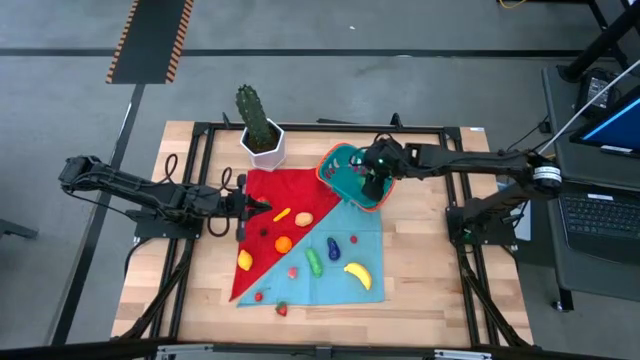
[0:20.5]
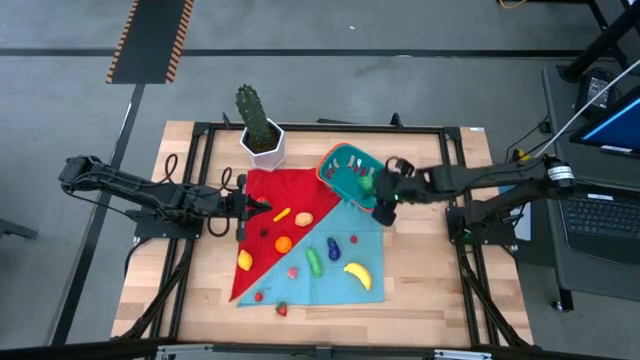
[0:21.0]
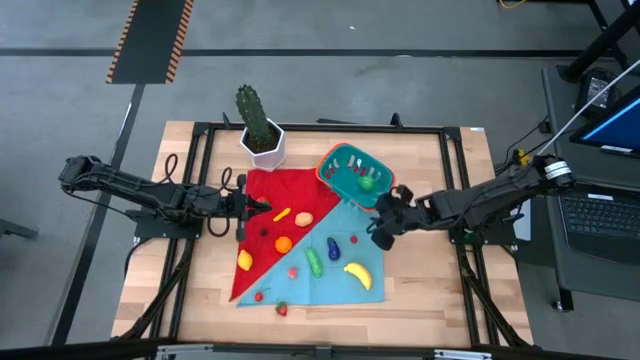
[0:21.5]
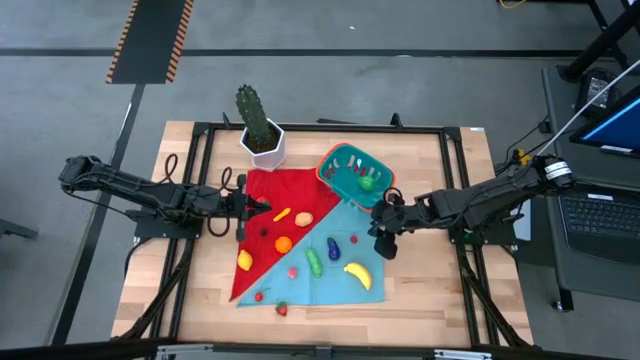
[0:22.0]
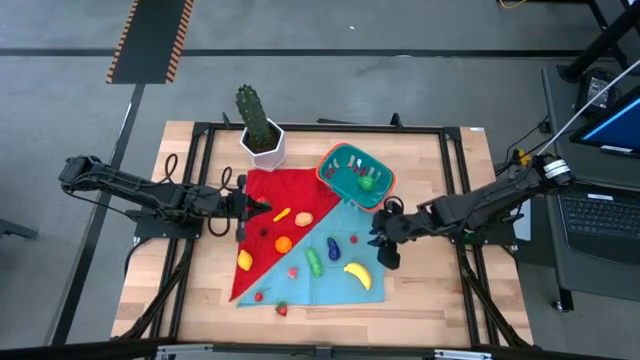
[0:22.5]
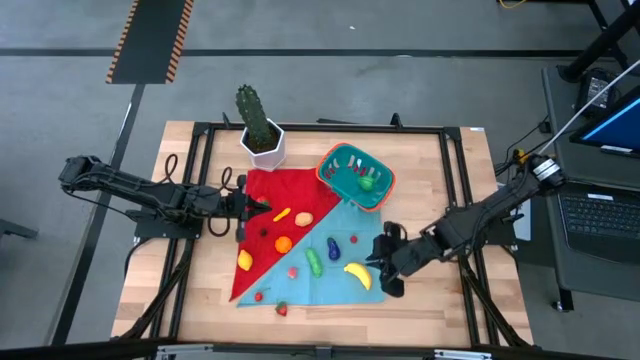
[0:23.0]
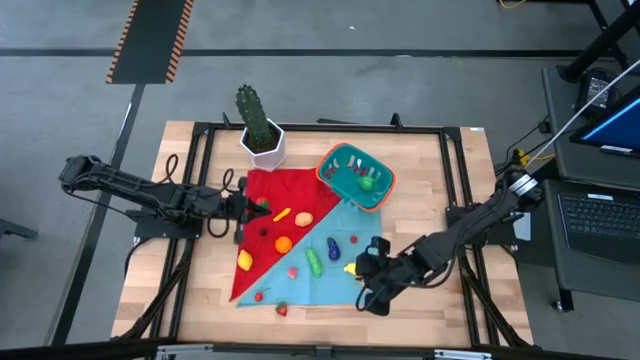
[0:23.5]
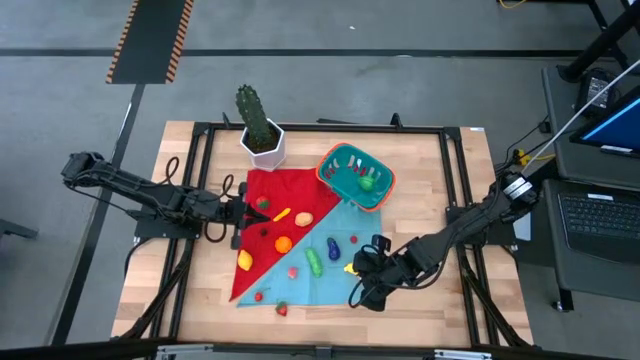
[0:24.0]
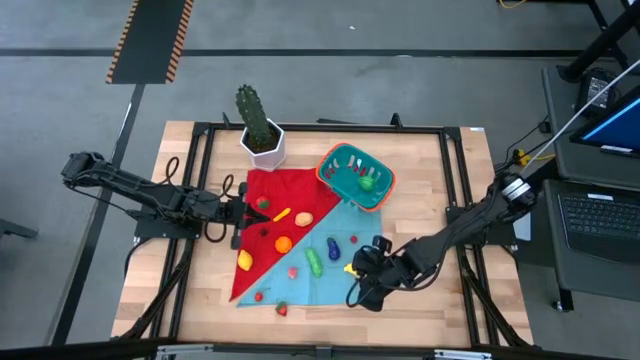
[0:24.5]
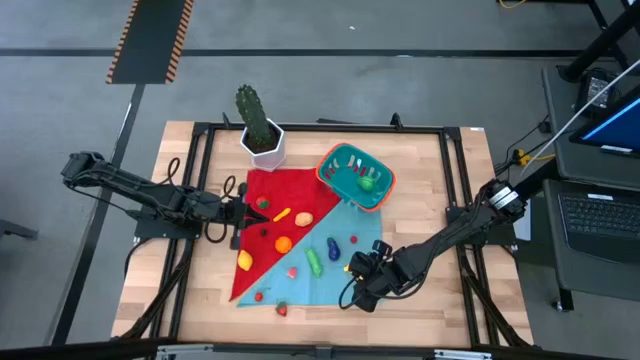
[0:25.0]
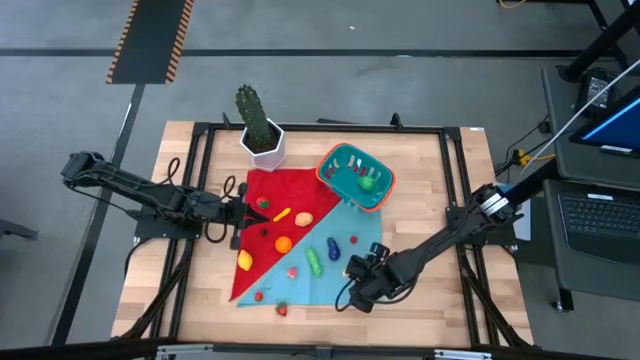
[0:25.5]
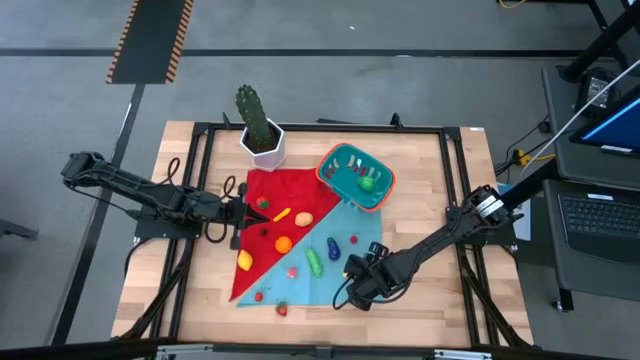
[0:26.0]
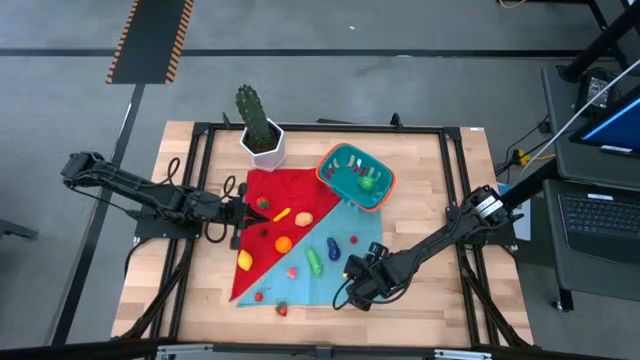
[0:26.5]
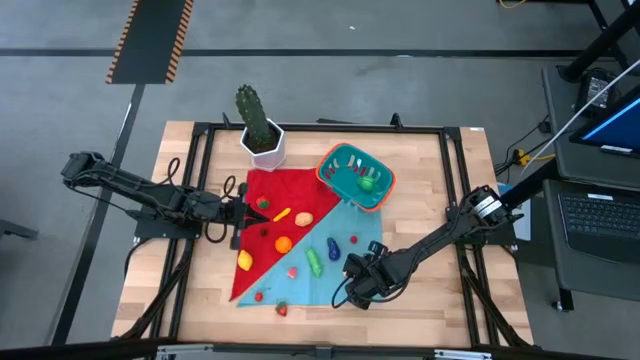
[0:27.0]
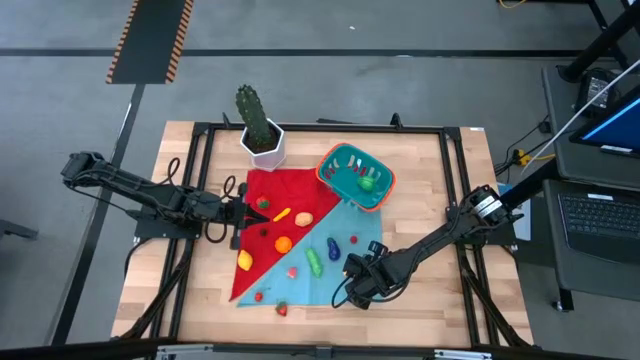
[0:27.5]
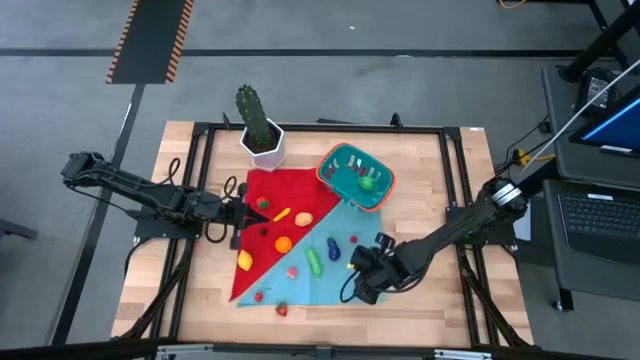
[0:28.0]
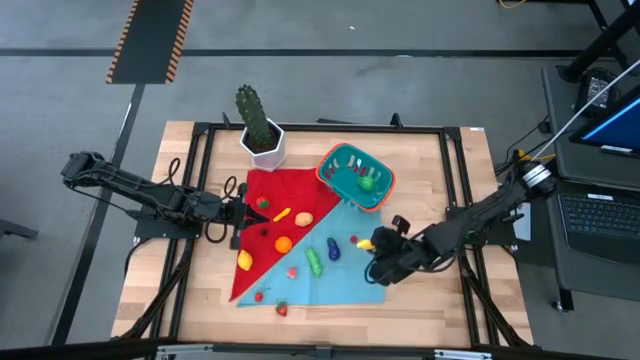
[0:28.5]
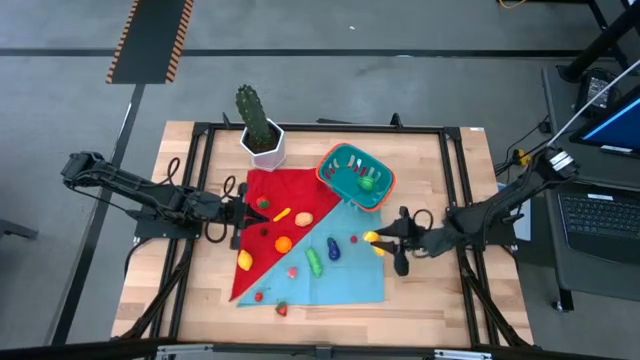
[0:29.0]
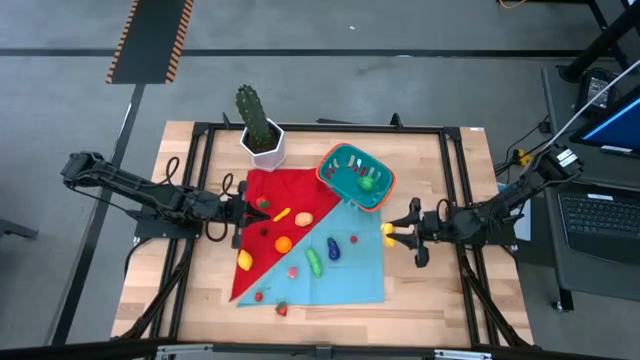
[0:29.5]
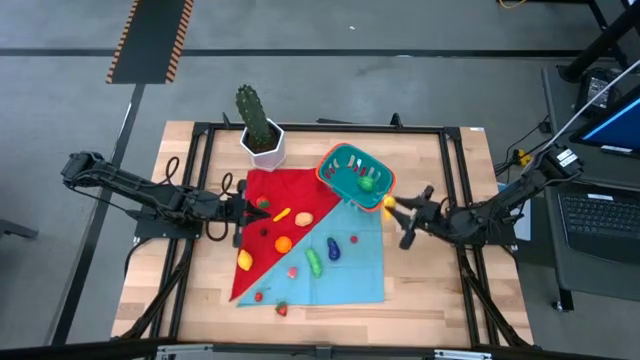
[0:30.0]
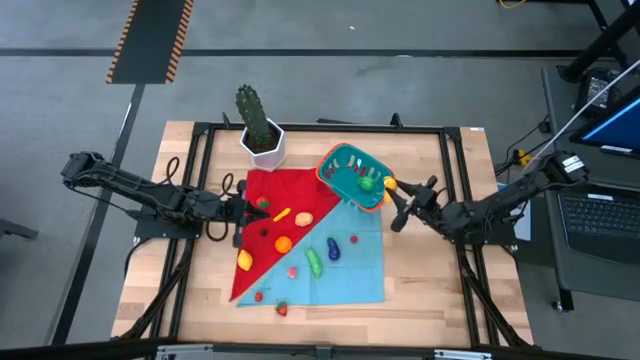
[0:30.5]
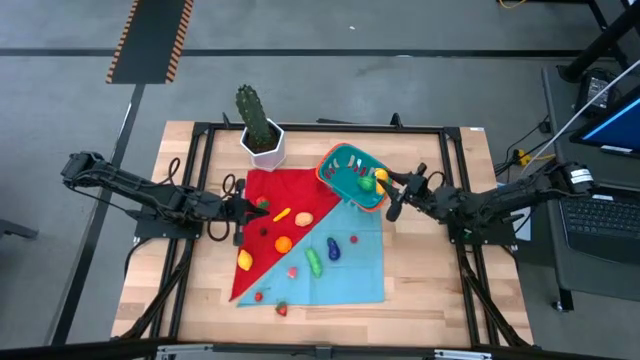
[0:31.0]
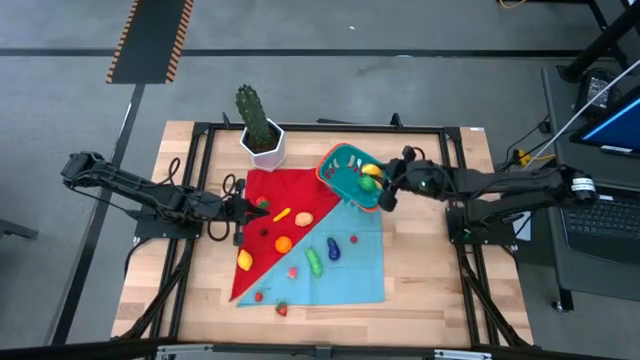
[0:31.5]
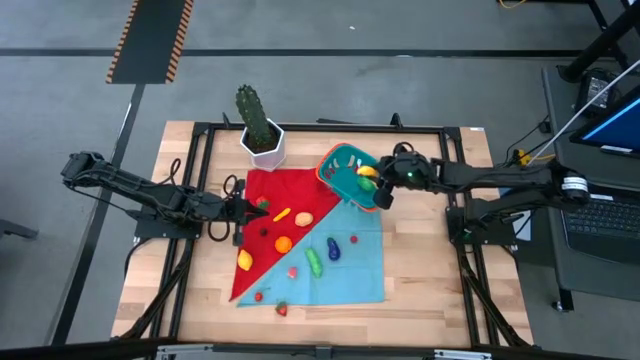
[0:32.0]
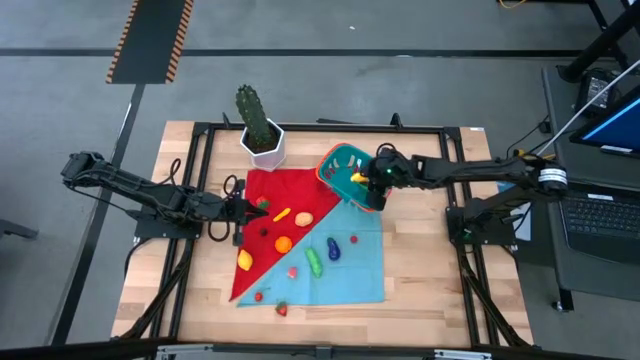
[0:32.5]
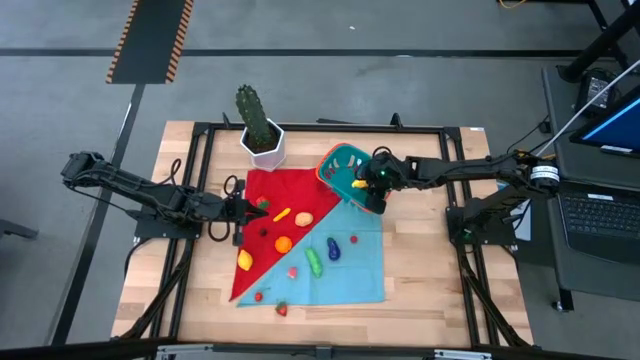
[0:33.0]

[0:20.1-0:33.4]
Task: Build produce basket
Put the yellow banana into the blue basket

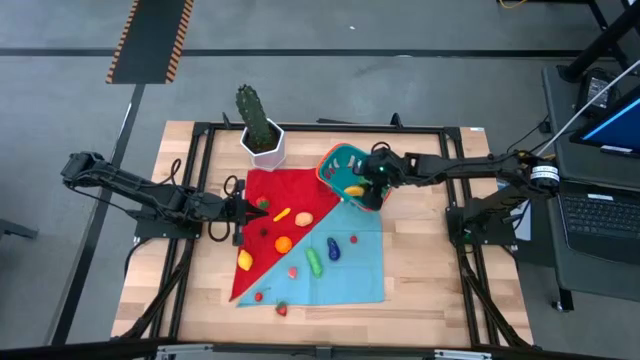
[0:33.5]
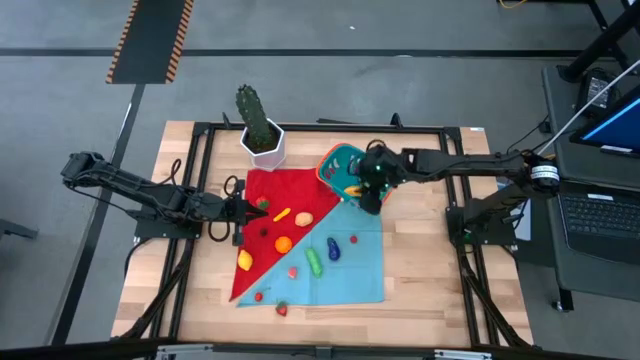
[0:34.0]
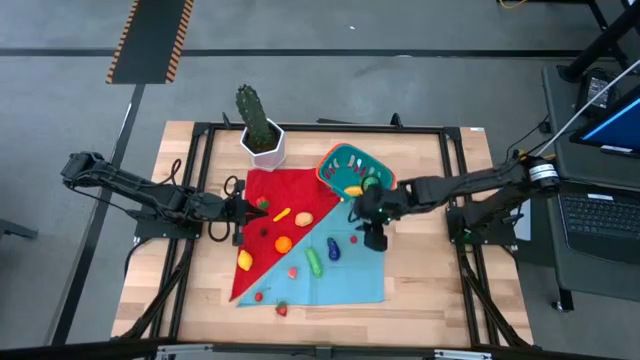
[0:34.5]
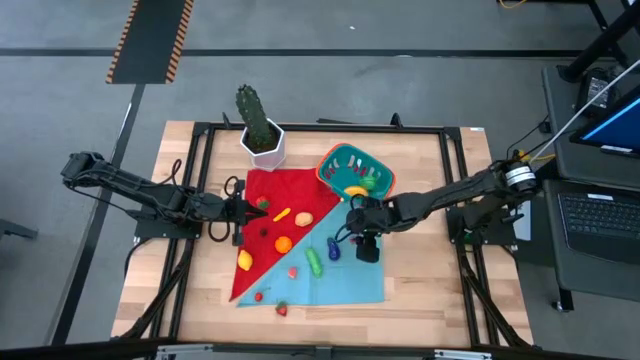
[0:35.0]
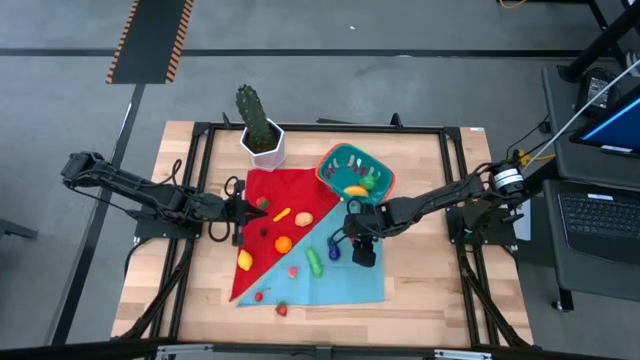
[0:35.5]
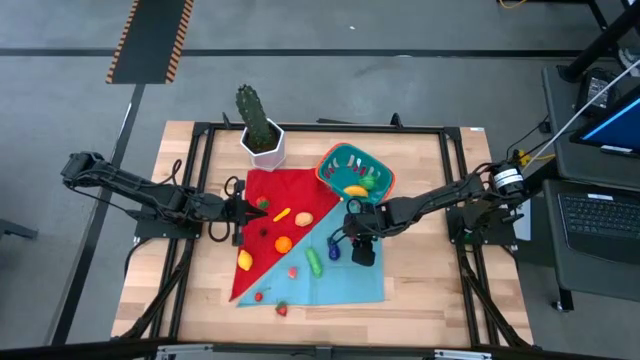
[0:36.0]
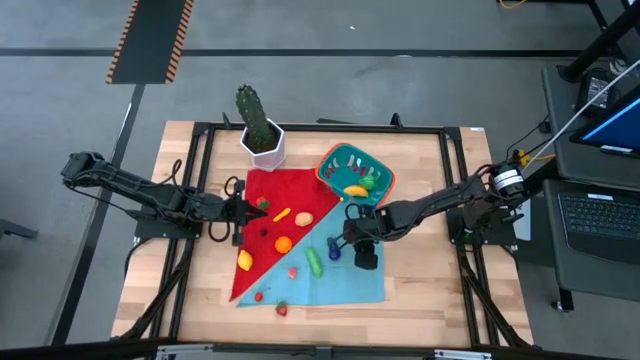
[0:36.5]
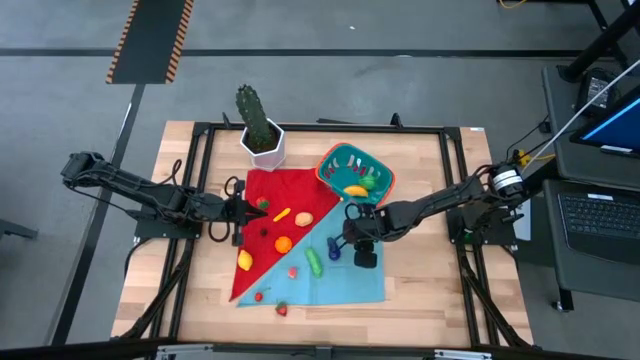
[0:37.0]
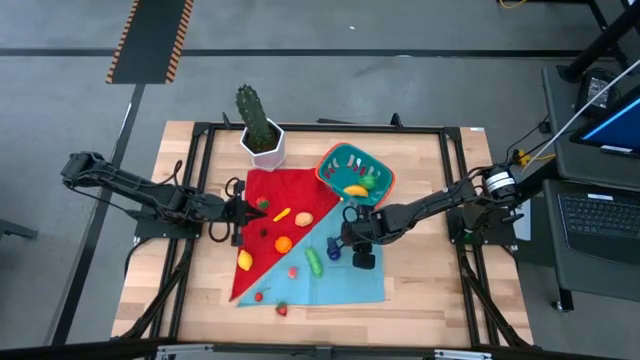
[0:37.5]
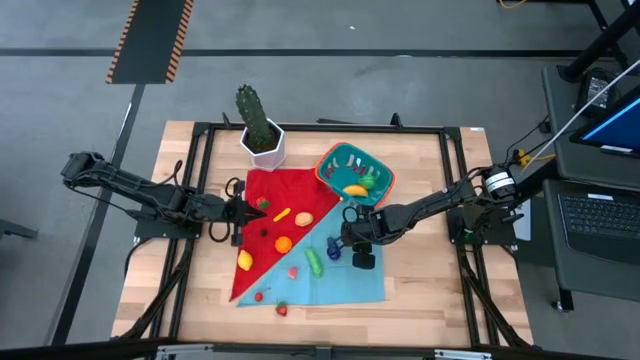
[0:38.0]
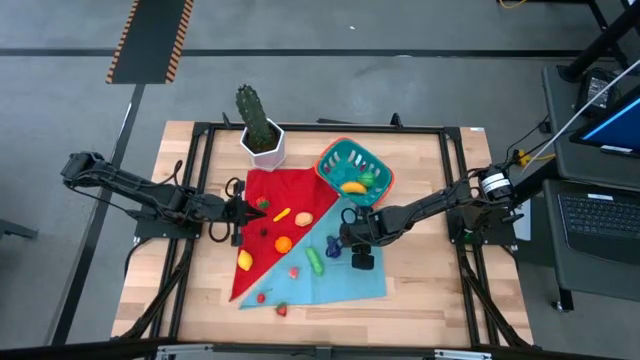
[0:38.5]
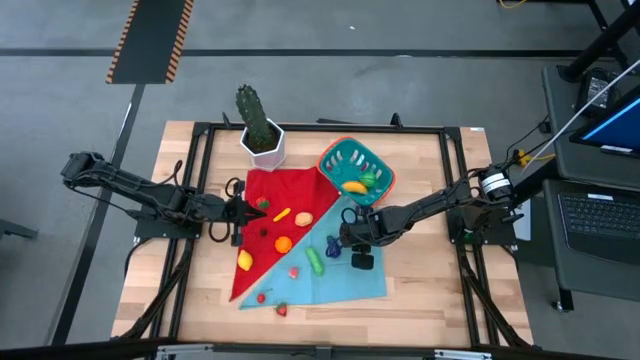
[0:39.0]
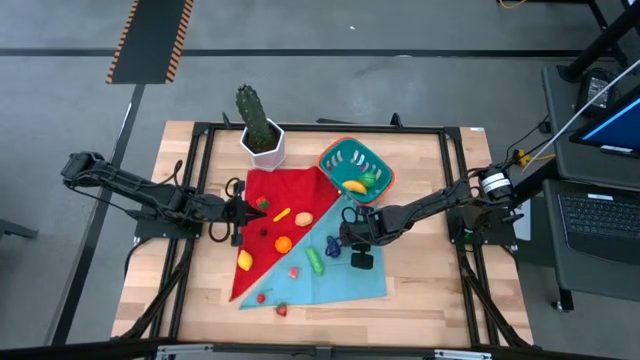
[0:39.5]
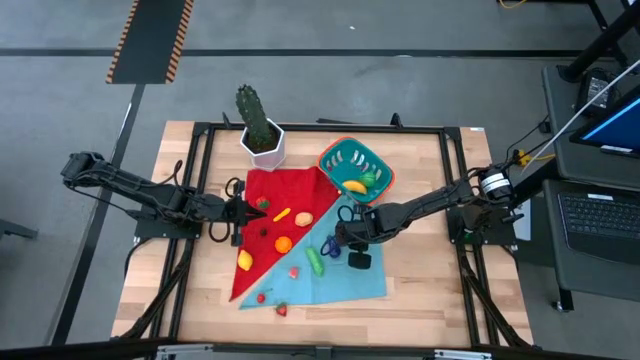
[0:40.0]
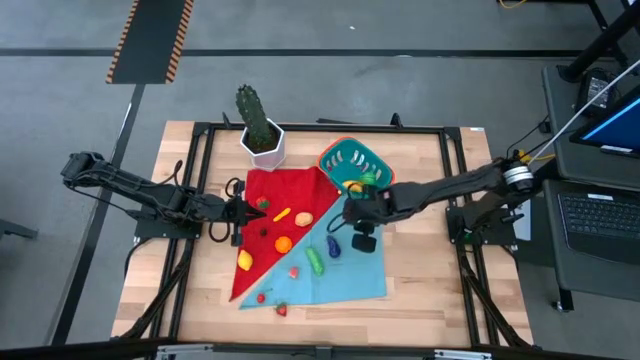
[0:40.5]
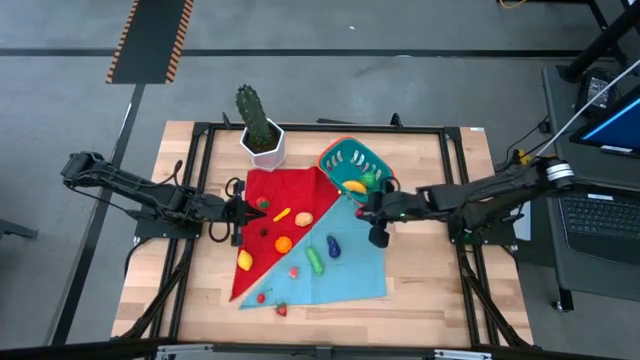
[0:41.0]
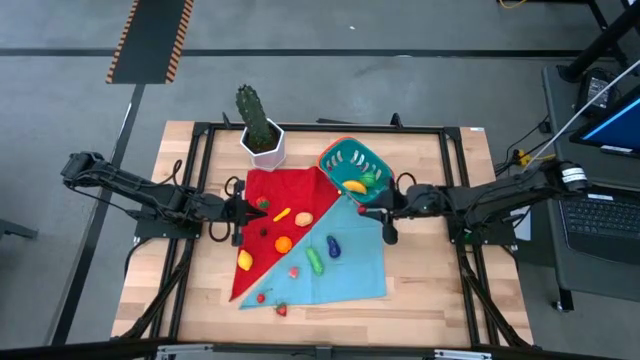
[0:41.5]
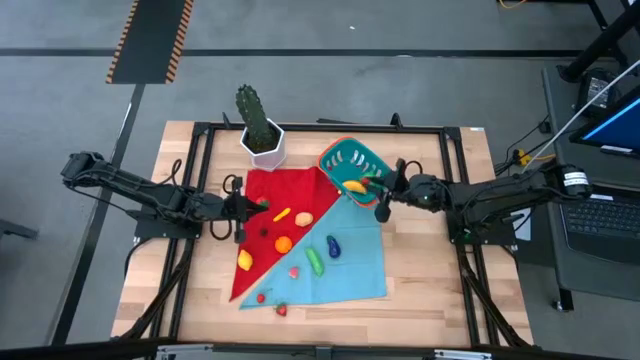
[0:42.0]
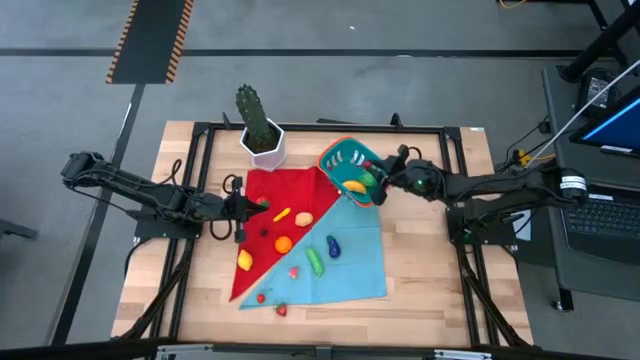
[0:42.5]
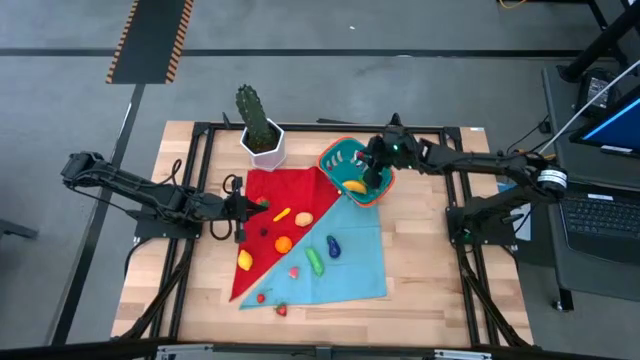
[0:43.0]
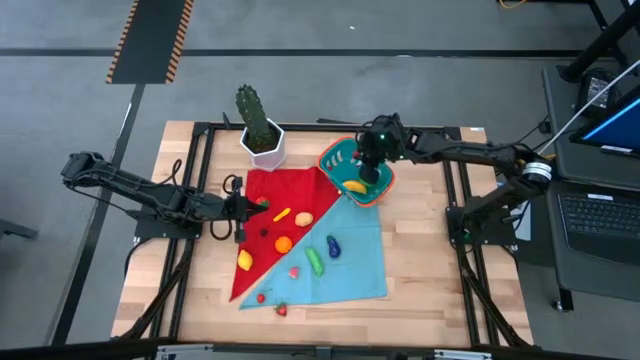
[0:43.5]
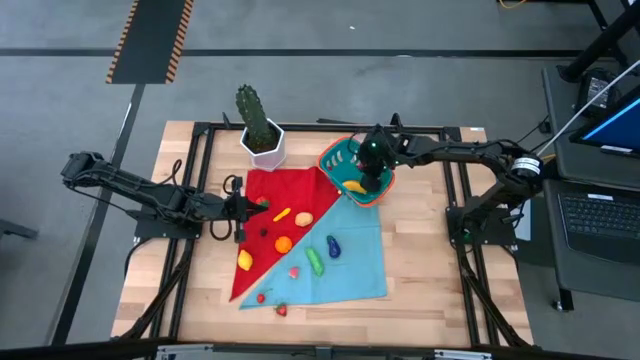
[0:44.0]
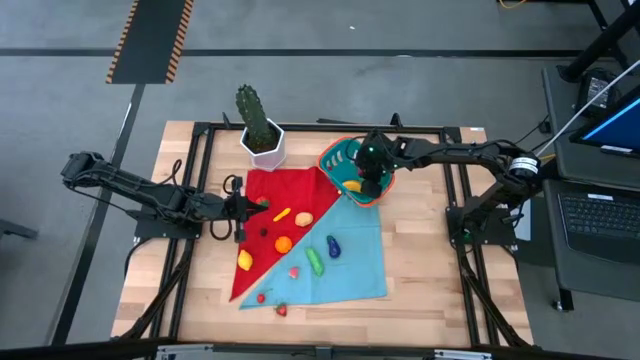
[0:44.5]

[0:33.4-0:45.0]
Put the red raspberry into the blue basket
